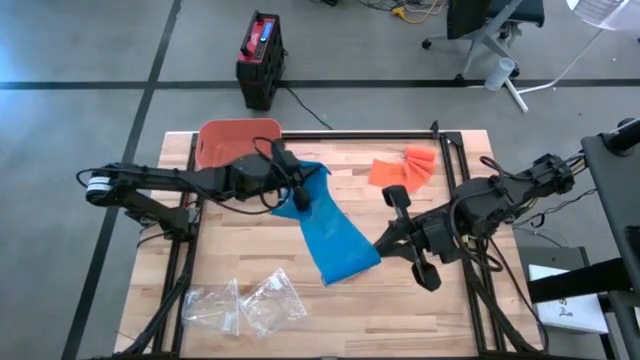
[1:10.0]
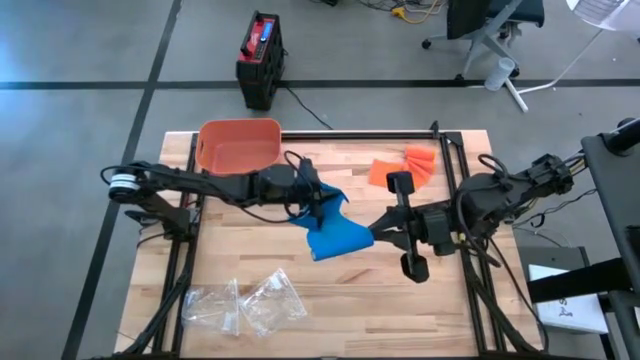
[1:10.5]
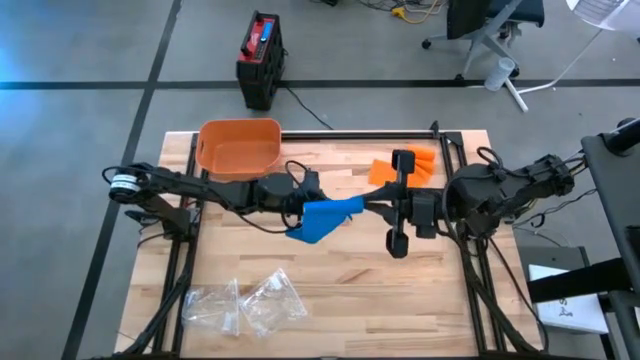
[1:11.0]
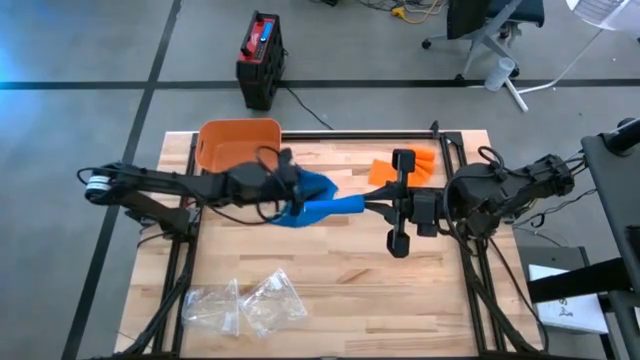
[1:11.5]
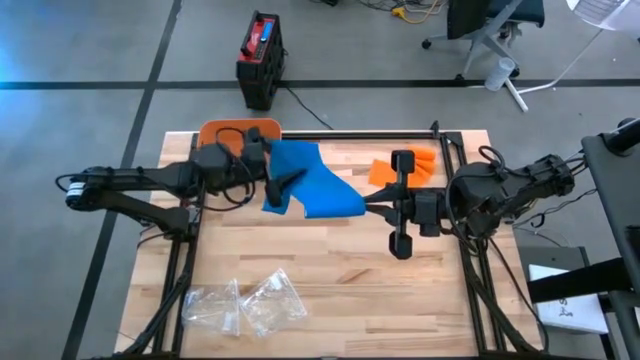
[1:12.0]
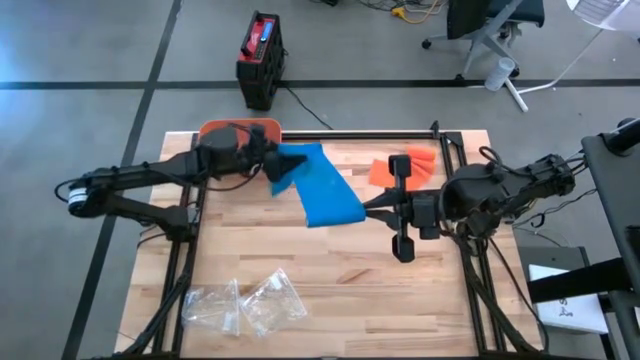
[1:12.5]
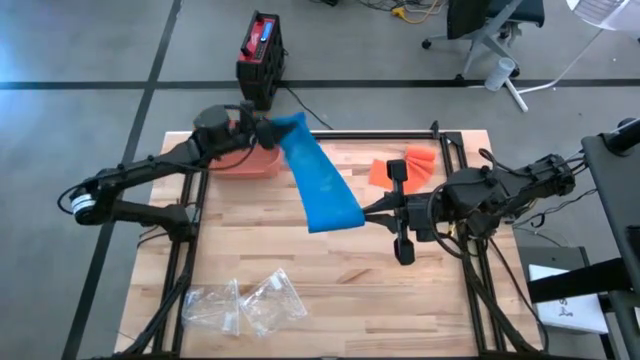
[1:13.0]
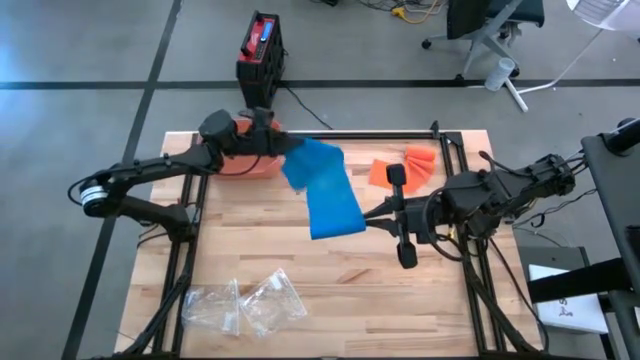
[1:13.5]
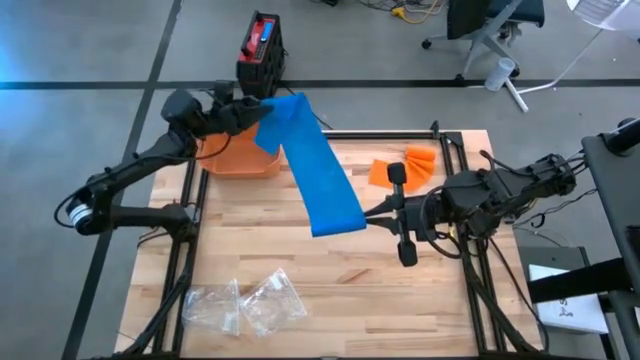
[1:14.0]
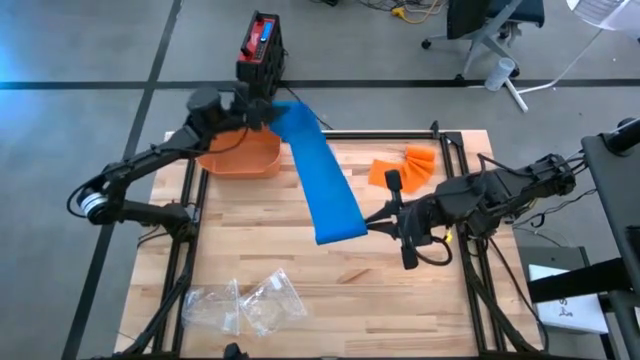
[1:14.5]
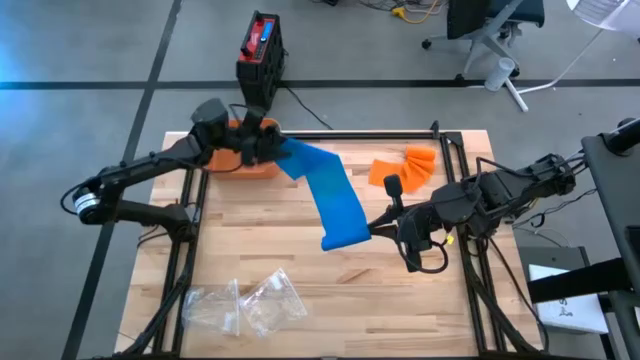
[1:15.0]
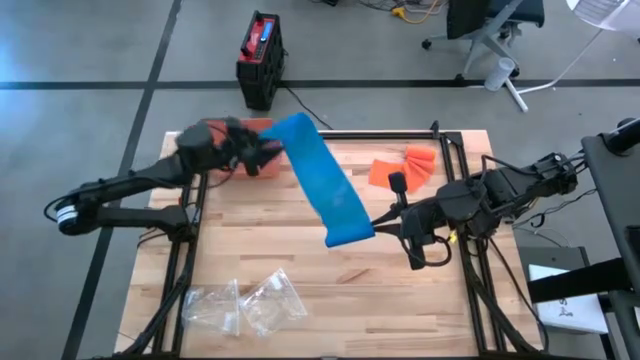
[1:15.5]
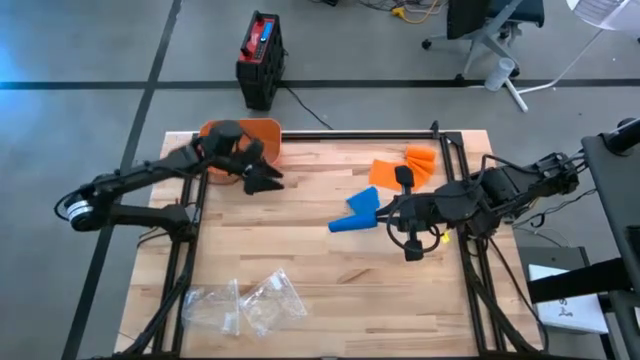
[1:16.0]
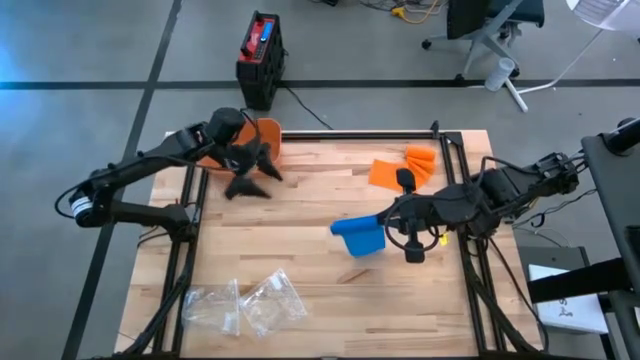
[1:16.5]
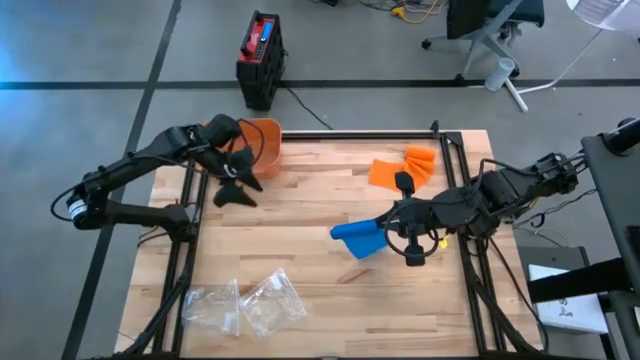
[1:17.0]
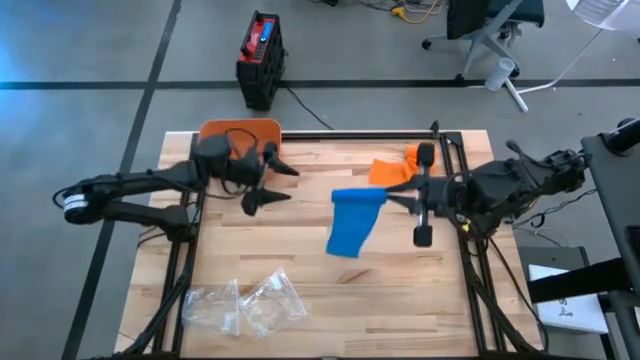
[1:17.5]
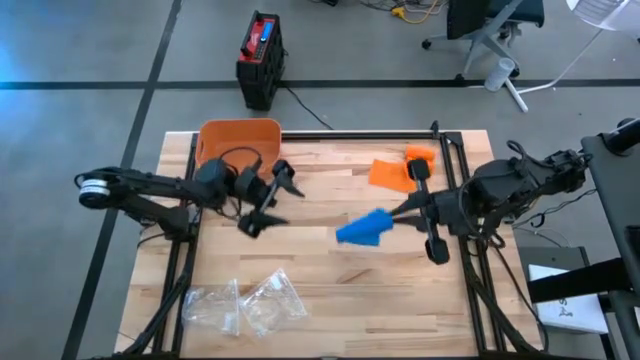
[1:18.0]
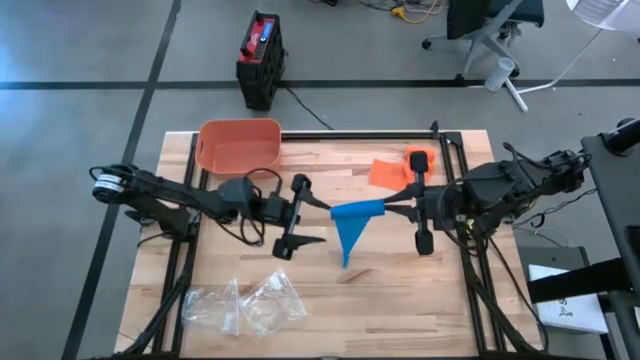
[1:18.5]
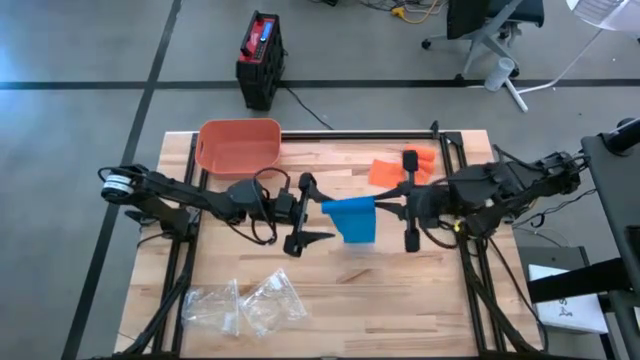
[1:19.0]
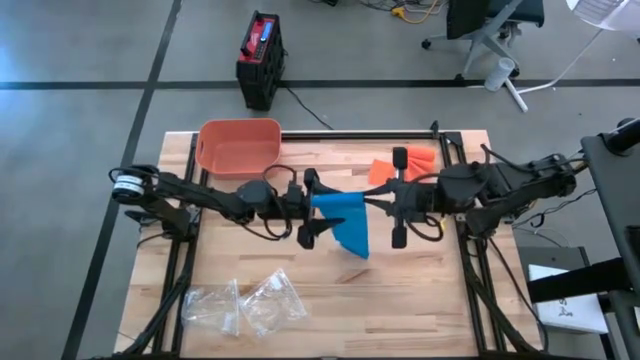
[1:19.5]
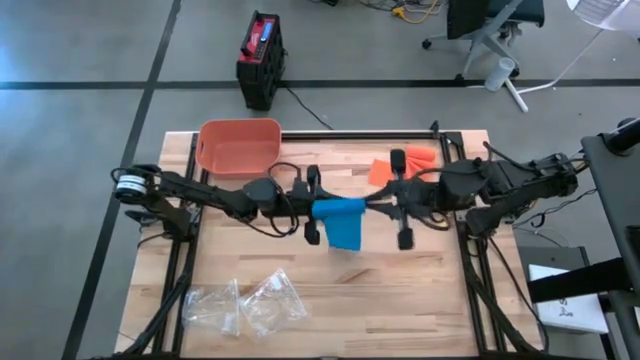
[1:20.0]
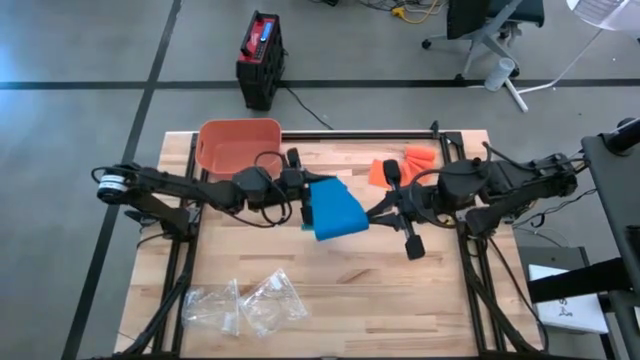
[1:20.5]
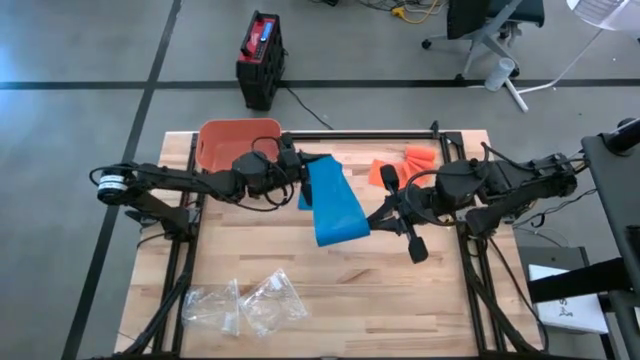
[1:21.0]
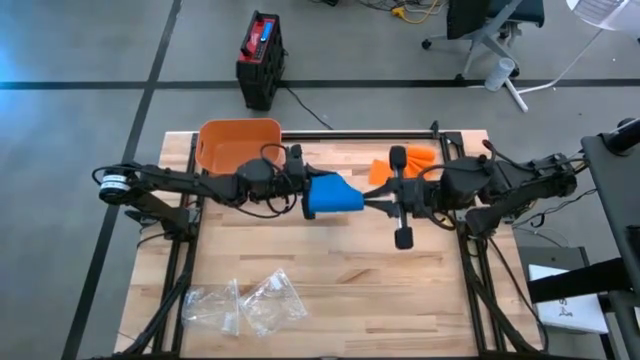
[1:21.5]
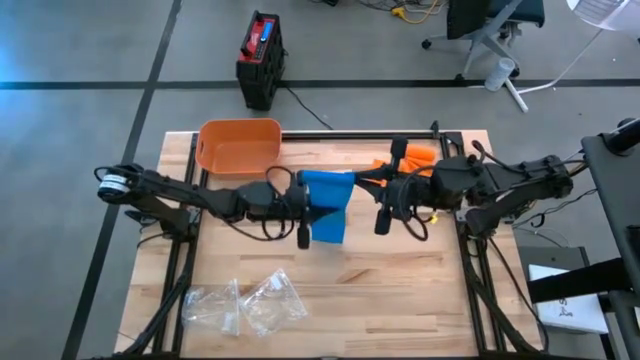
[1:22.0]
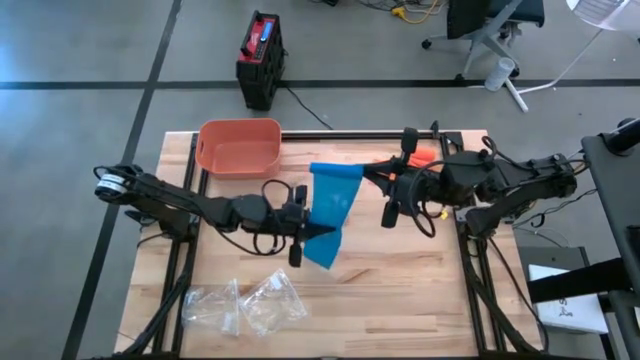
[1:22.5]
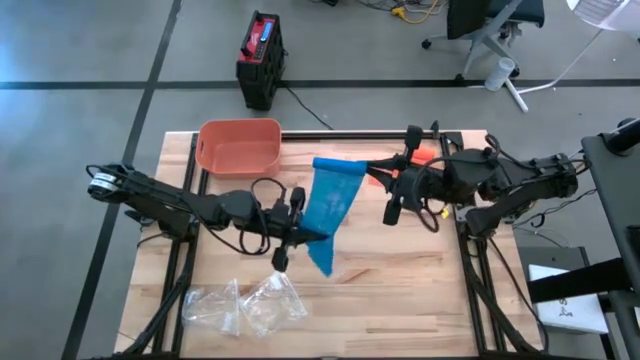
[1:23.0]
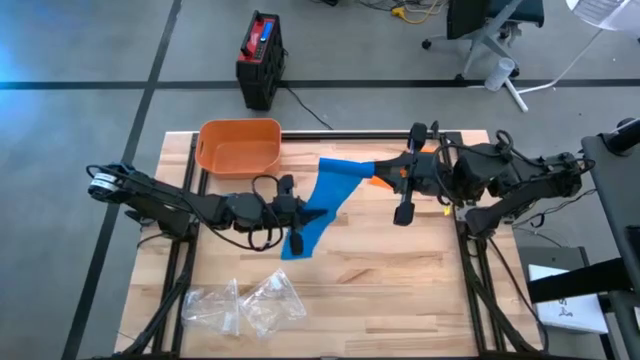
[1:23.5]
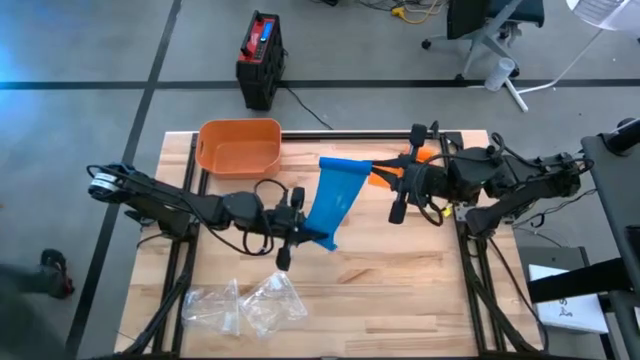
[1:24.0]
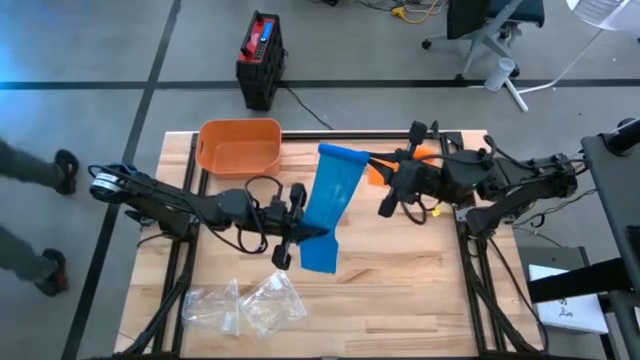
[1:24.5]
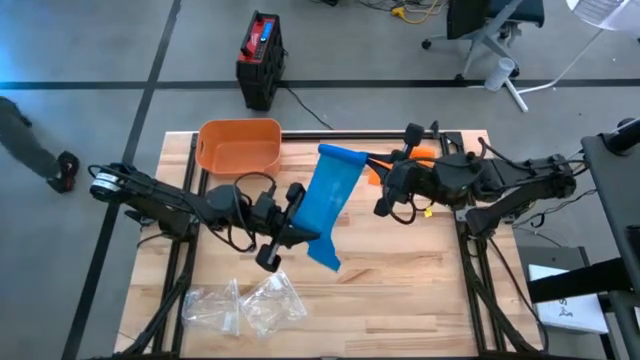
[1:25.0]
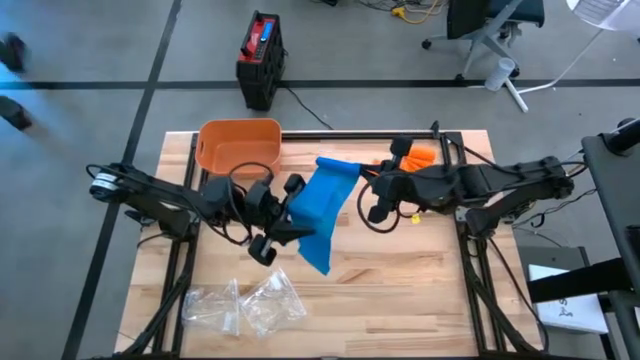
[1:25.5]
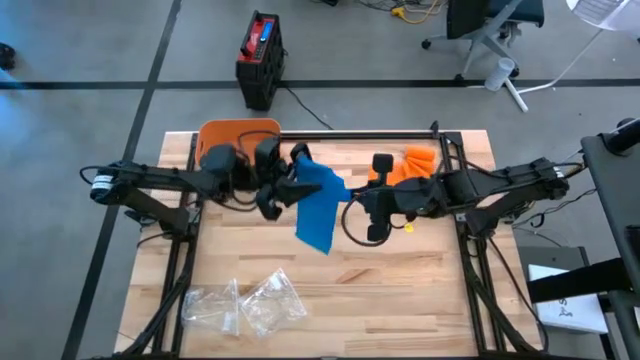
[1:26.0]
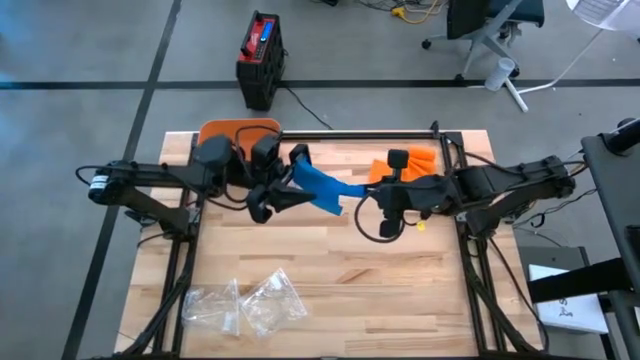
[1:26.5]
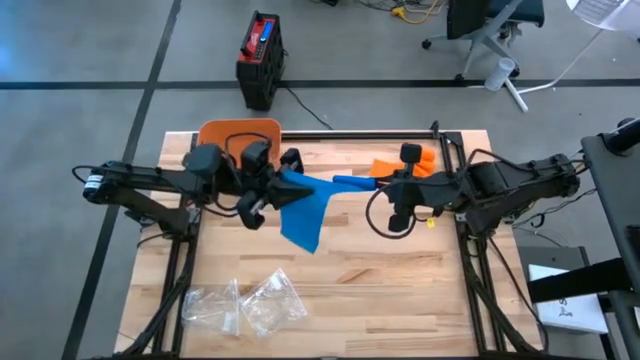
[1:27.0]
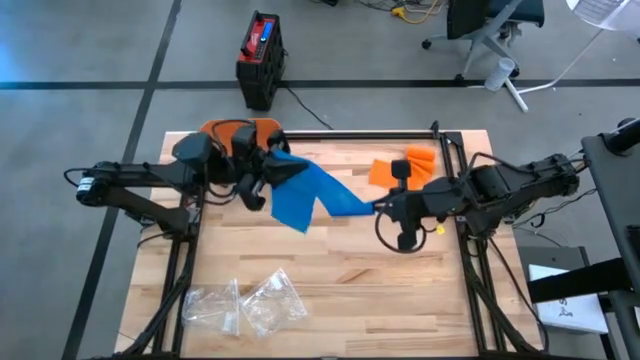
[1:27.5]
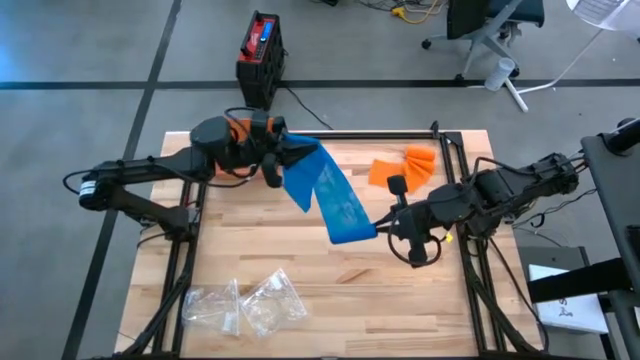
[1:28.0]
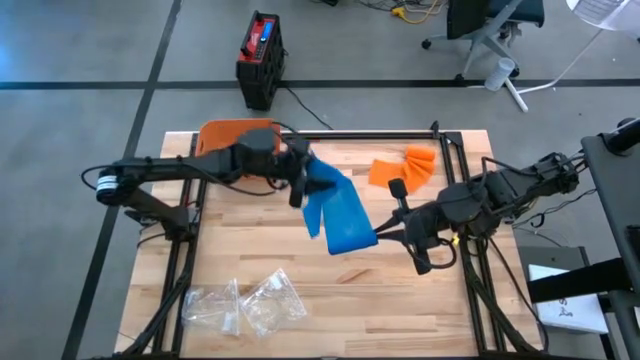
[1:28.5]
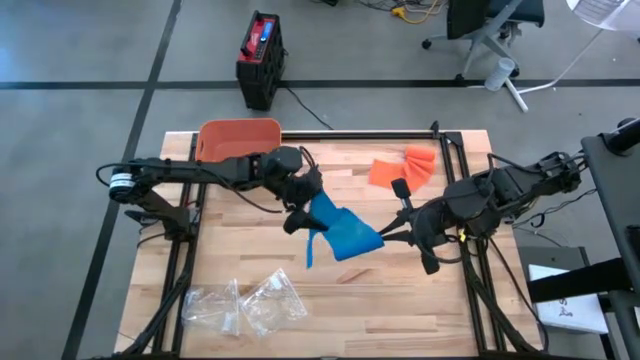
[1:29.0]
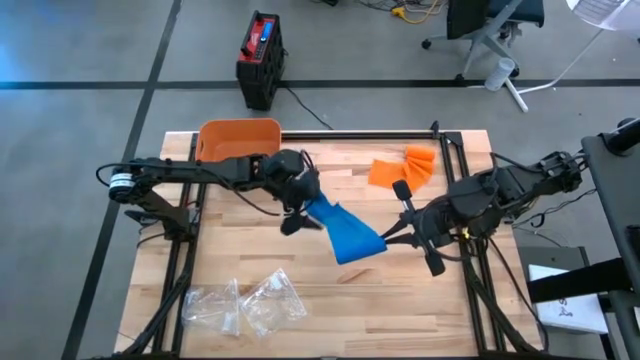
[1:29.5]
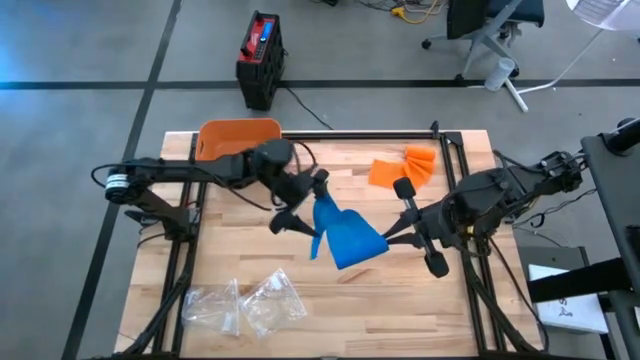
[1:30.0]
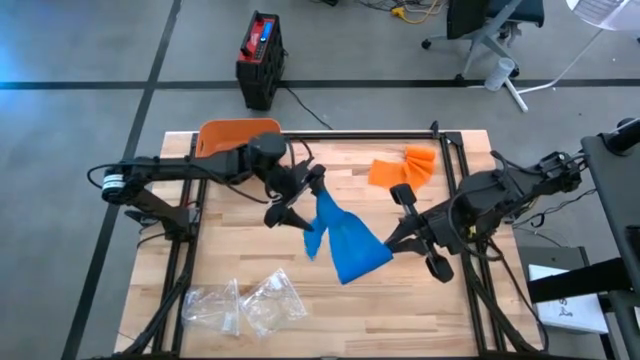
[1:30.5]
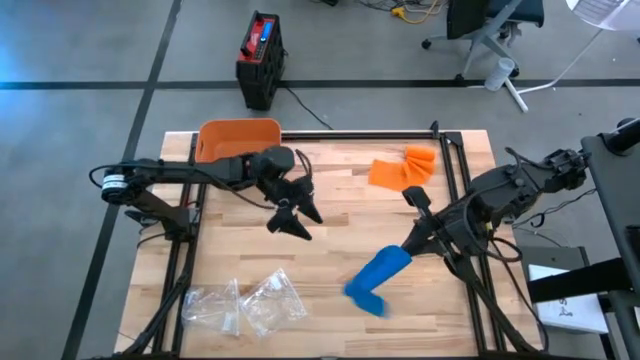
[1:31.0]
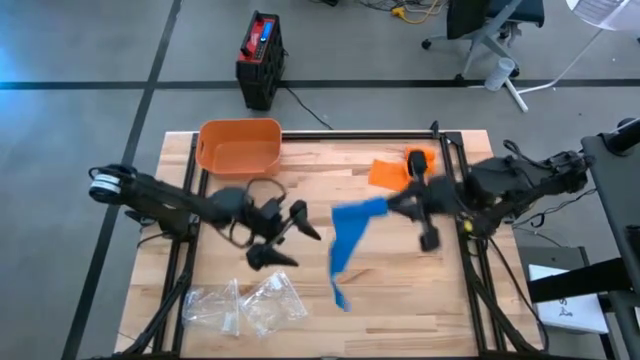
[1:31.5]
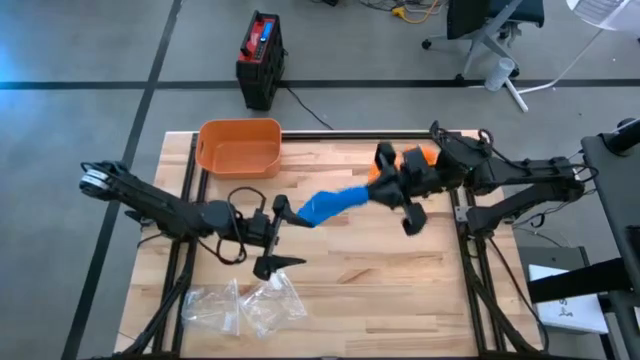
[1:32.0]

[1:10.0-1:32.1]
Task: Roll bandage
Roll the blue bandage
